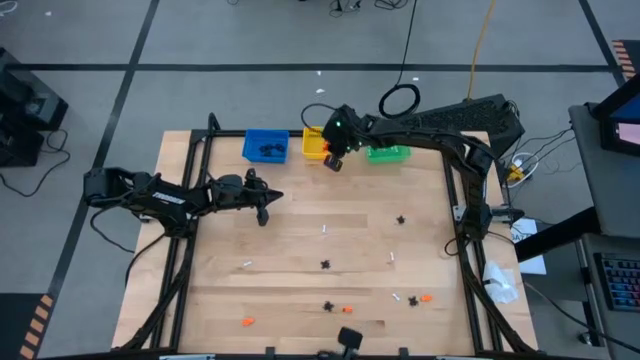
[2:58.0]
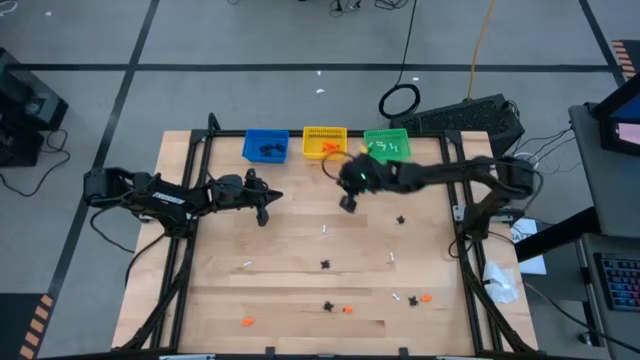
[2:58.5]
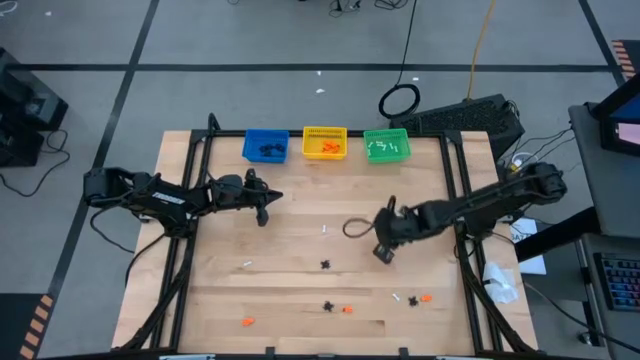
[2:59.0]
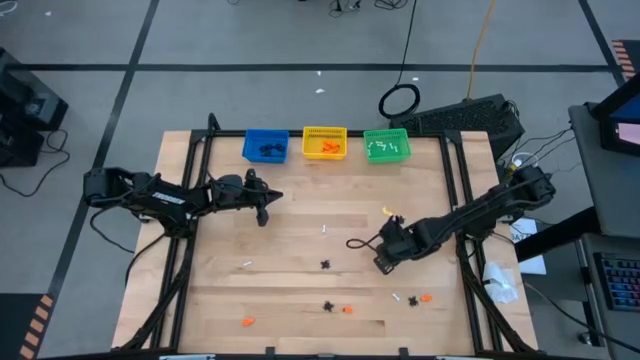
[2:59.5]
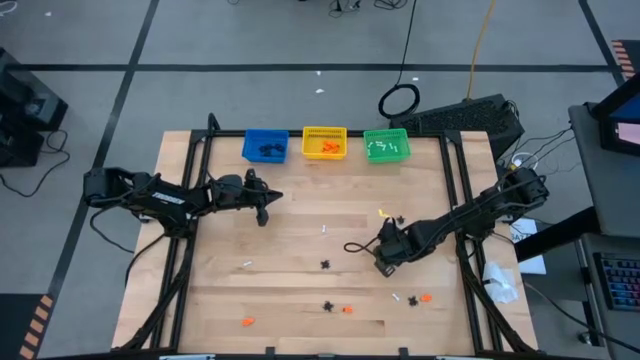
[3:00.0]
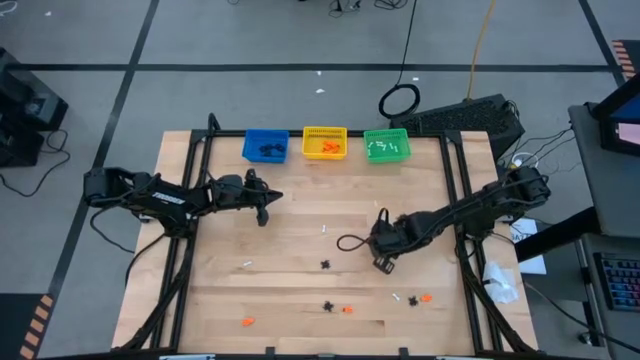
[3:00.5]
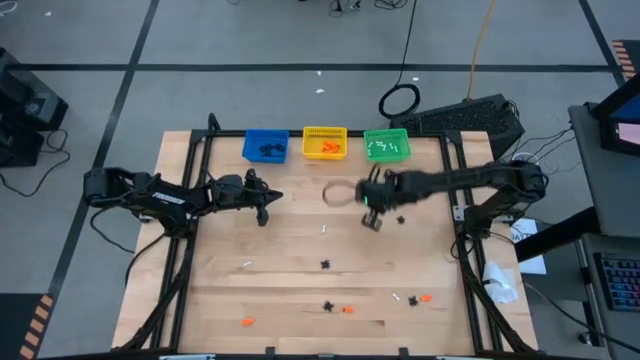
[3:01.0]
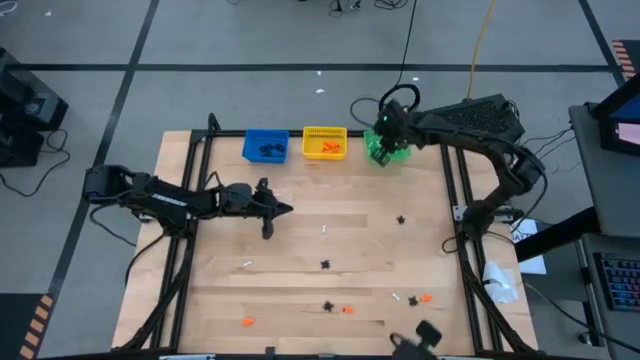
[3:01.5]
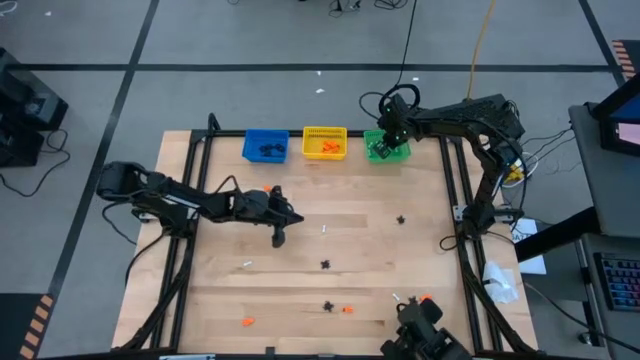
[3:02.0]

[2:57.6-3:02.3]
Task: Sort Halloween decoration
Put the white bone toy into the green bin

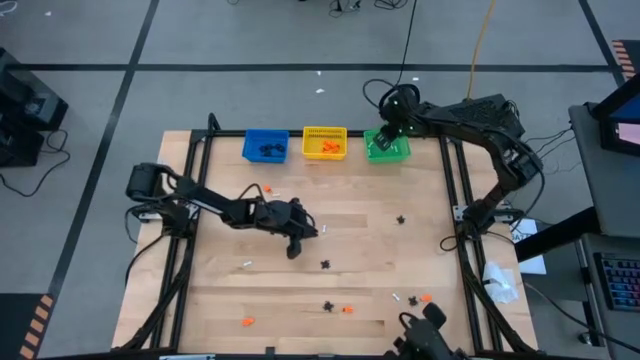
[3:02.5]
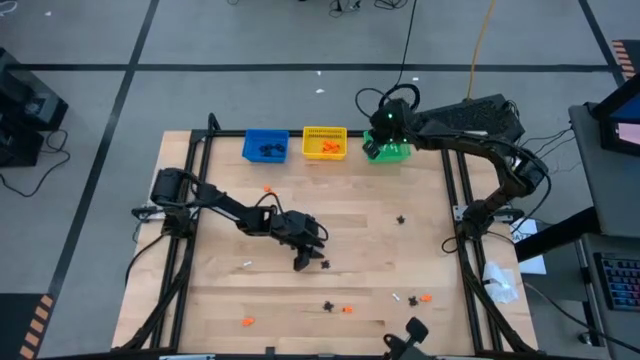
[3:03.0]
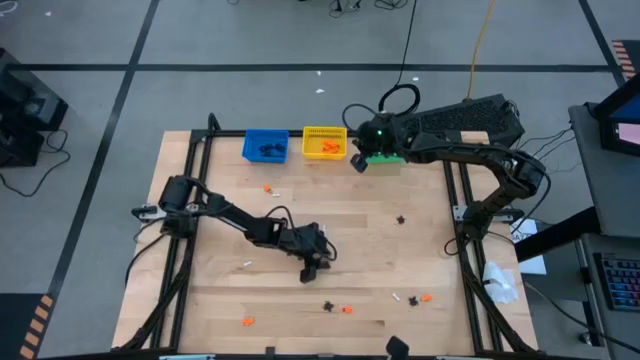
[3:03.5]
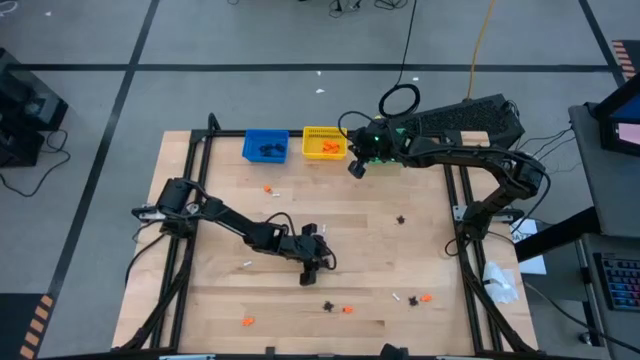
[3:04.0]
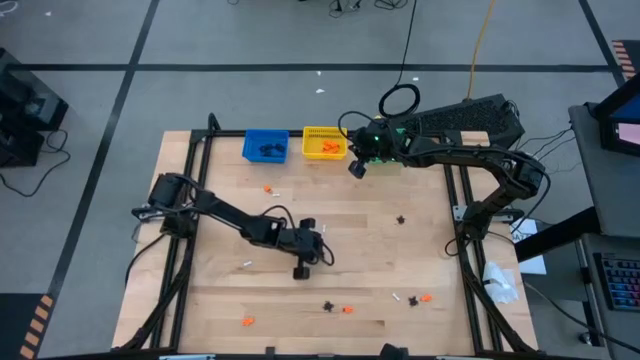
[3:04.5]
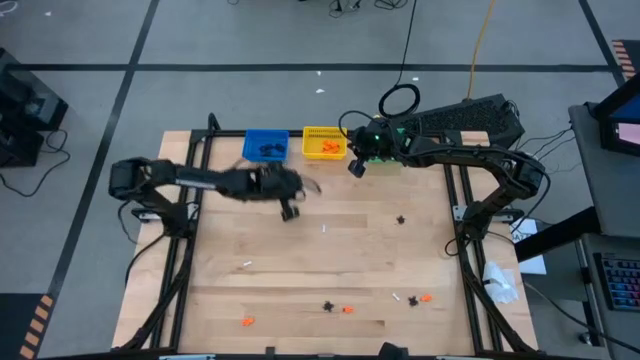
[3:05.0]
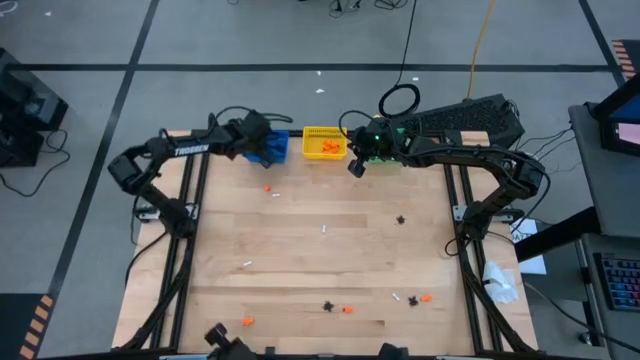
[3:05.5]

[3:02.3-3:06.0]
Put the black spider toy into the blue bin

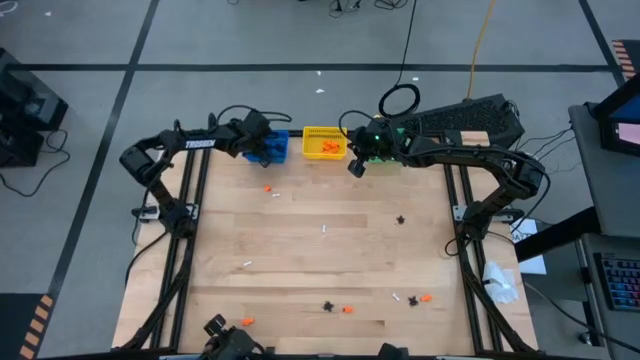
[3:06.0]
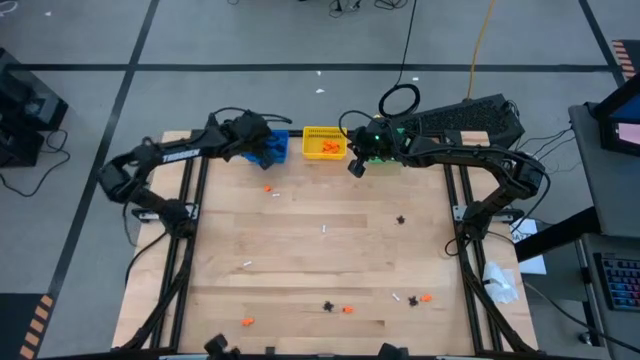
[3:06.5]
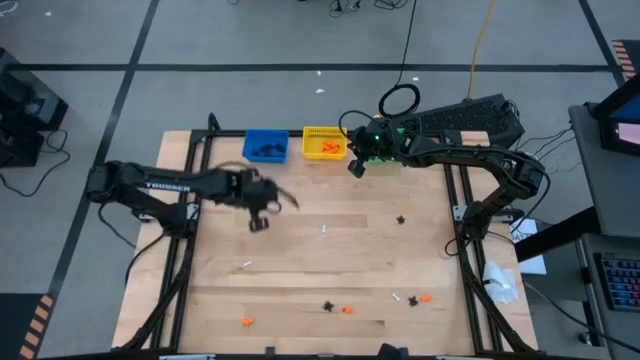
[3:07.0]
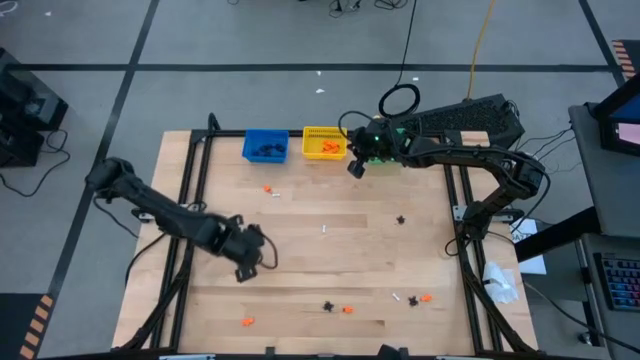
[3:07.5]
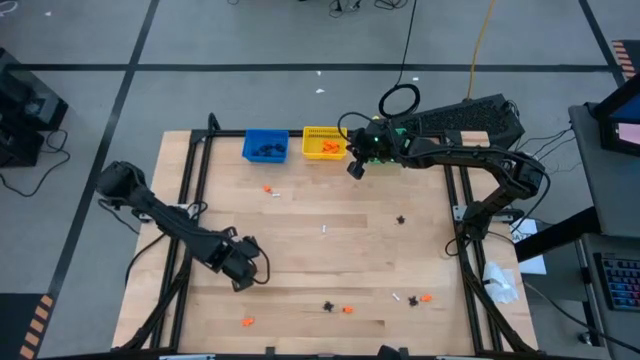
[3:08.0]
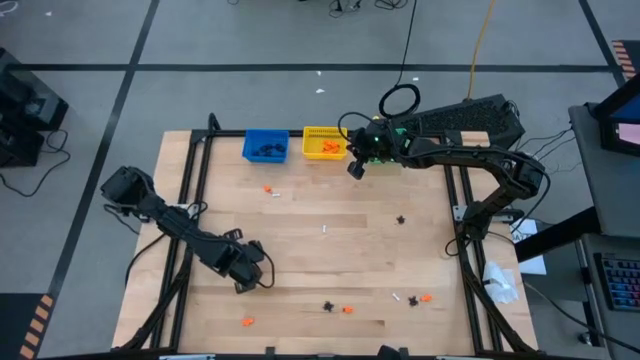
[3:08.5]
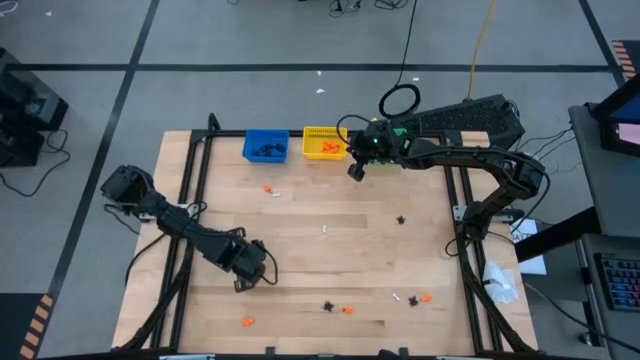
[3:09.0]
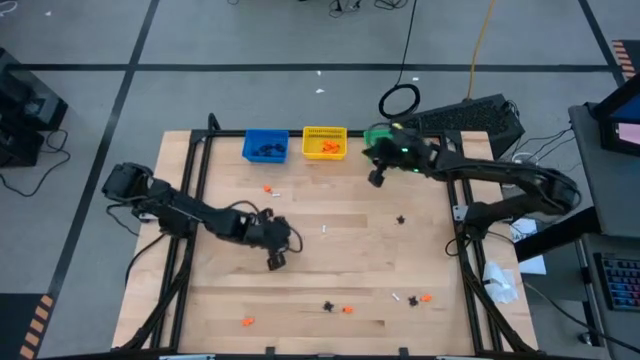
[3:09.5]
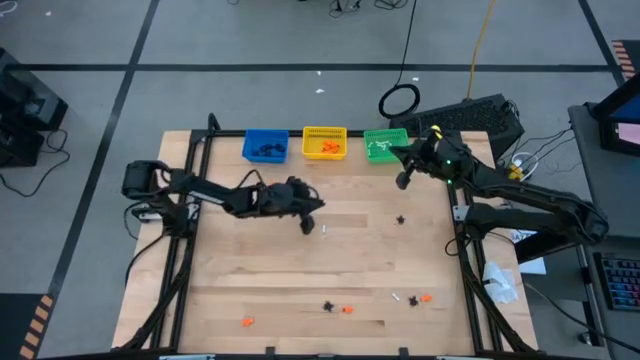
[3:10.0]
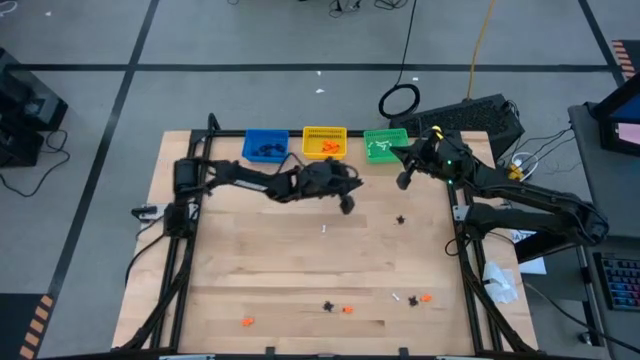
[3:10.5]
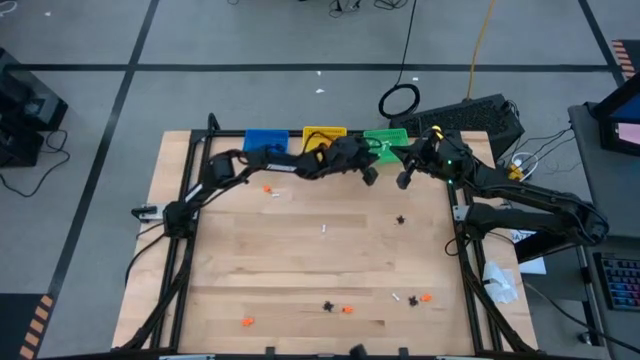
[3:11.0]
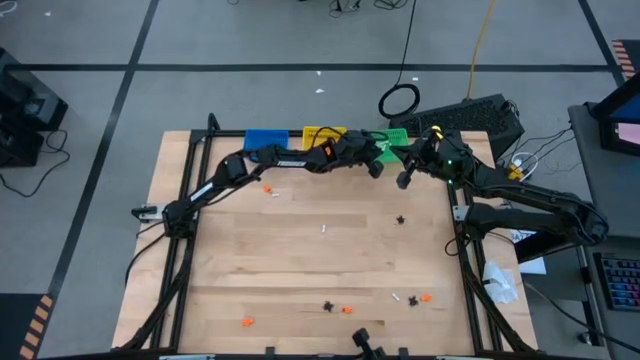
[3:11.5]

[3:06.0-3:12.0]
Put the white bone toy into the green bin

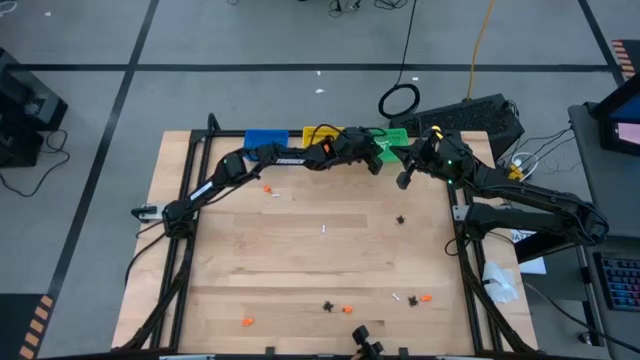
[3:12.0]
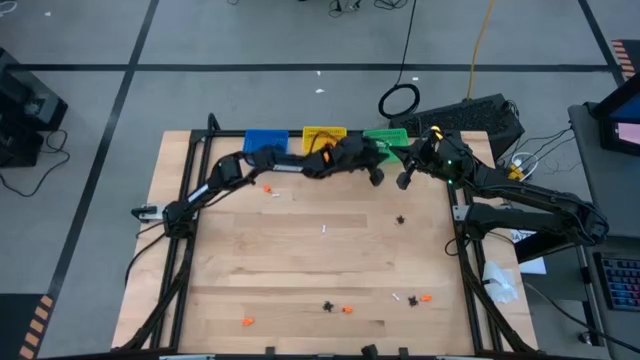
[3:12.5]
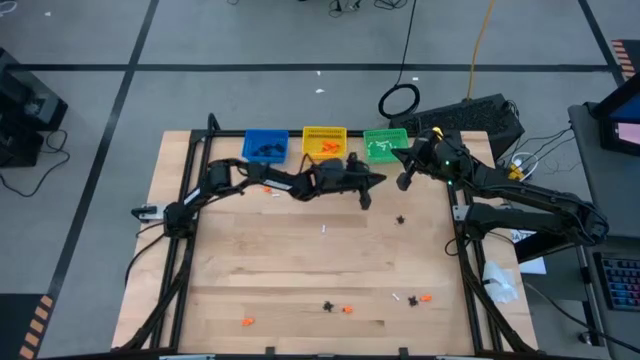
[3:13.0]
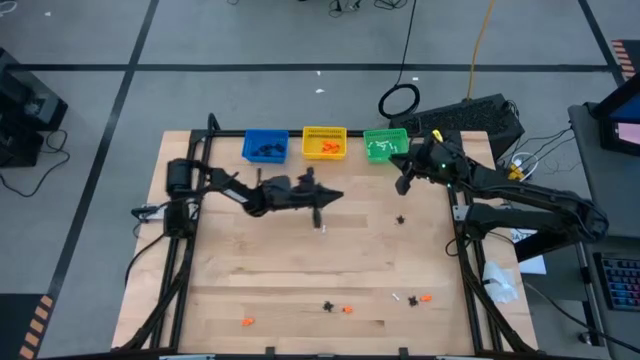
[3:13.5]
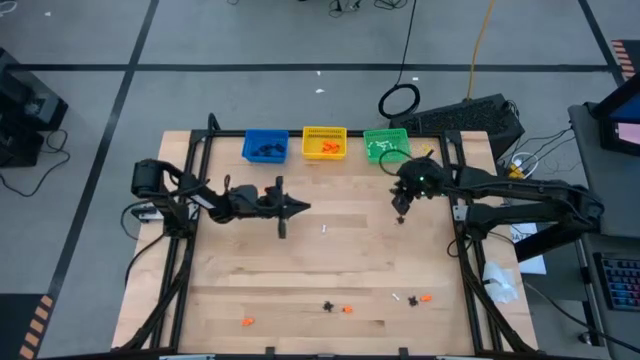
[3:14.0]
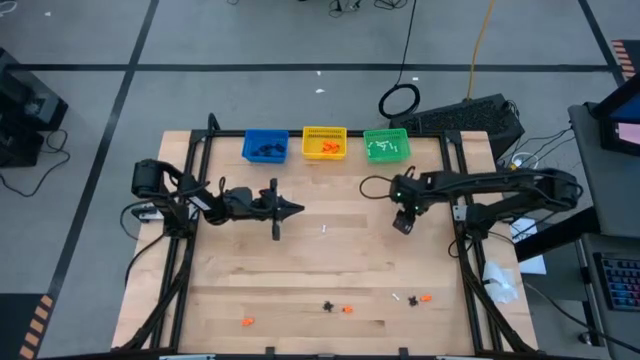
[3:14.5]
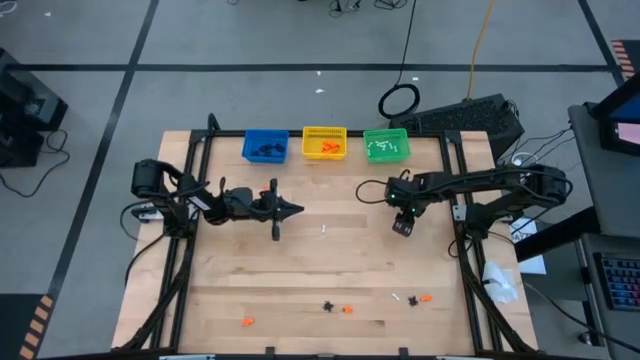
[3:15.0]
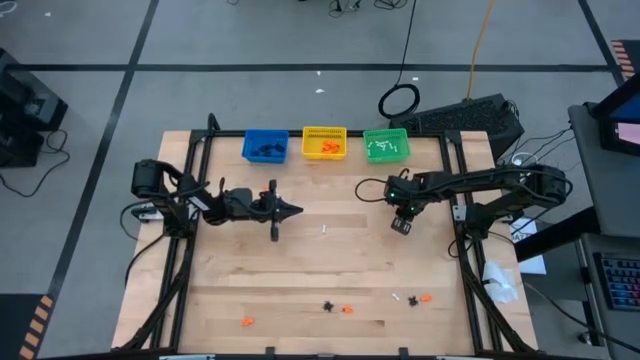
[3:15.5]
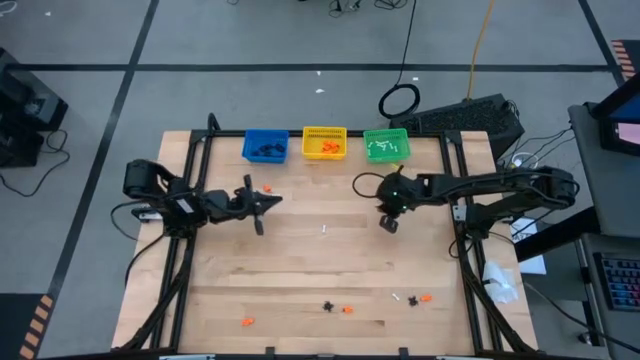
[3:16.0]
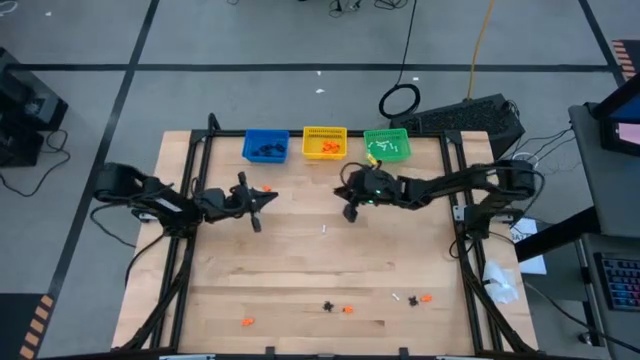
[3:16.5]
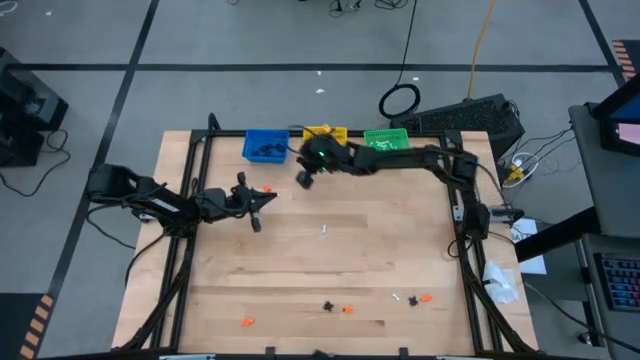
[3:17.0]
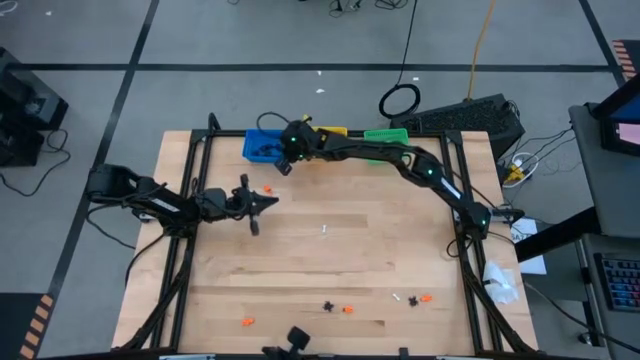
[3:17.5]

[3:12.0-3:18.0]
Put the black spider toy into the blue bin
